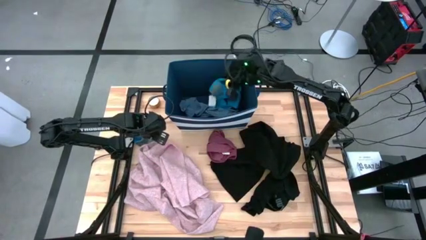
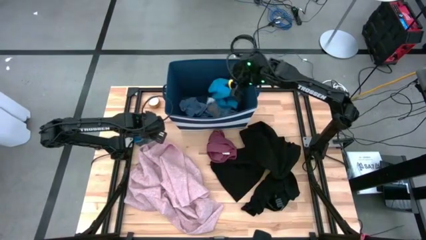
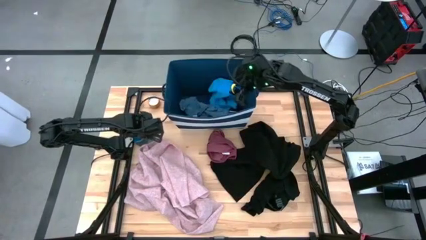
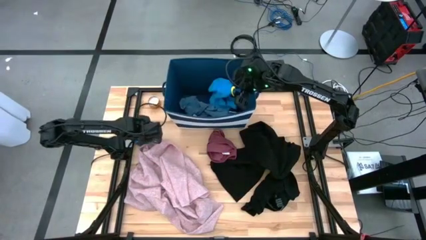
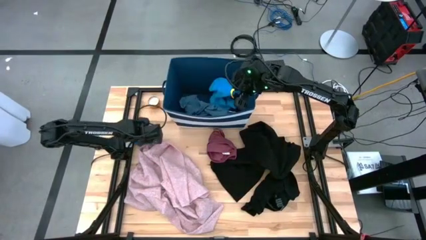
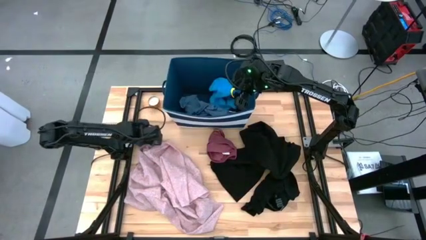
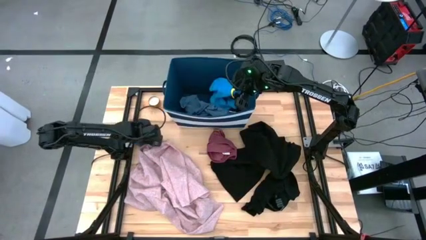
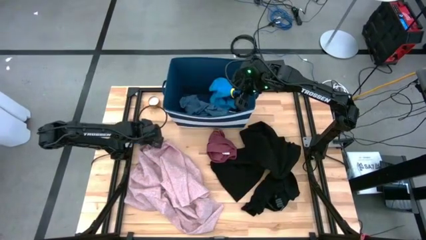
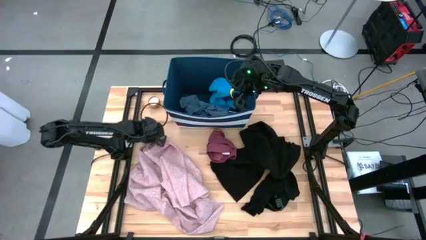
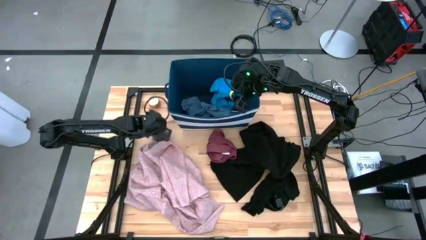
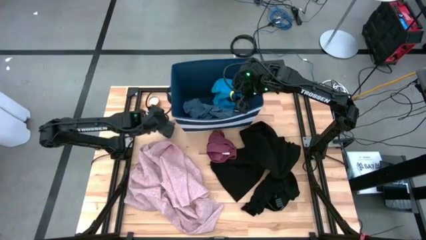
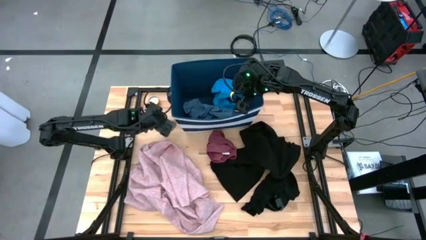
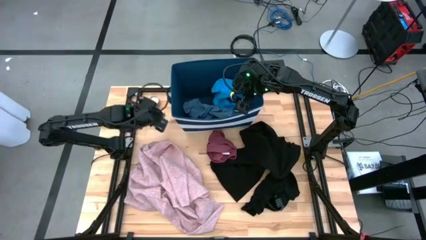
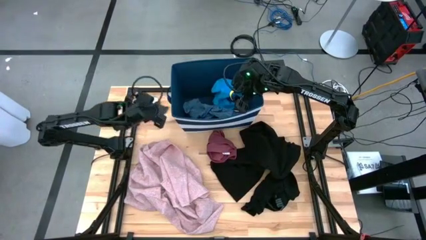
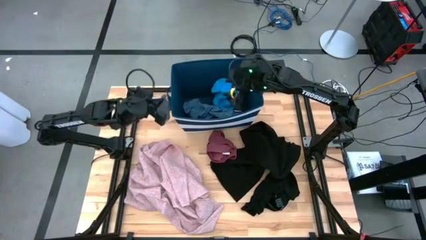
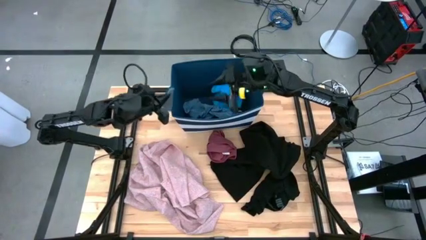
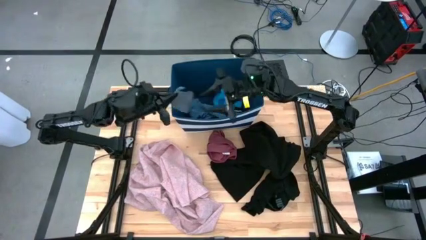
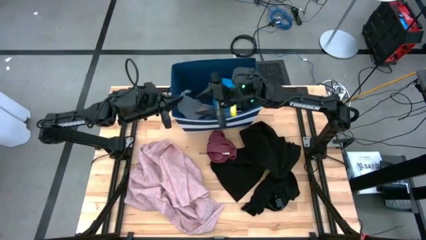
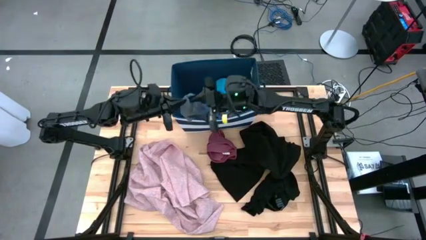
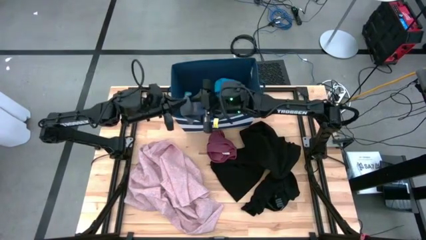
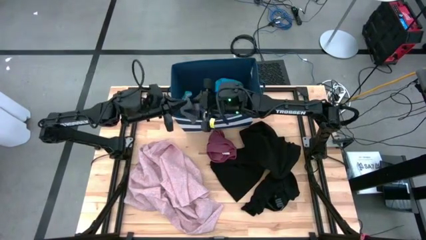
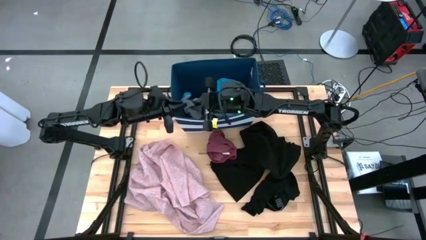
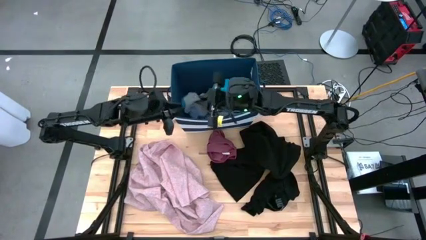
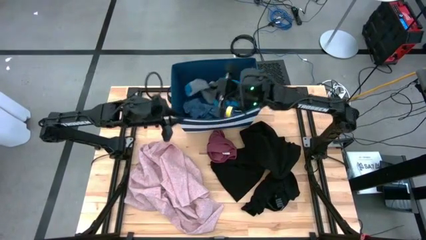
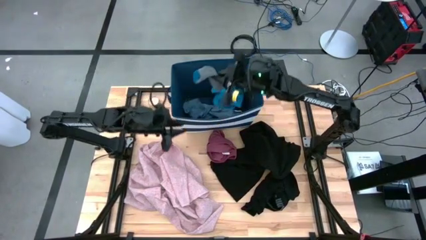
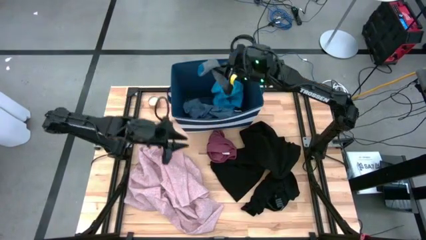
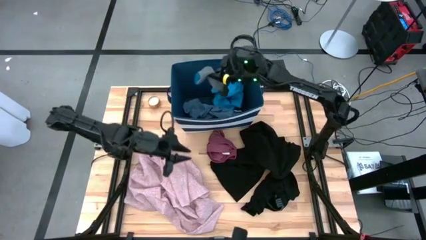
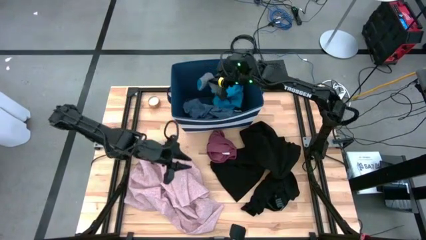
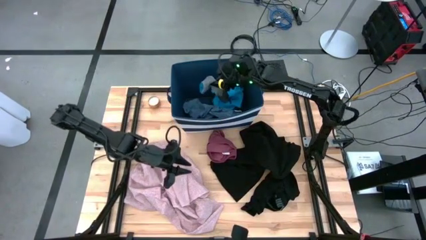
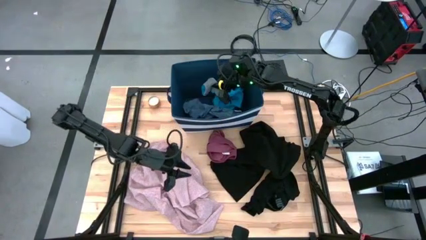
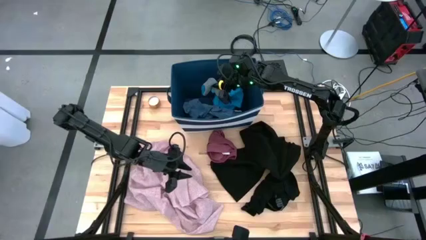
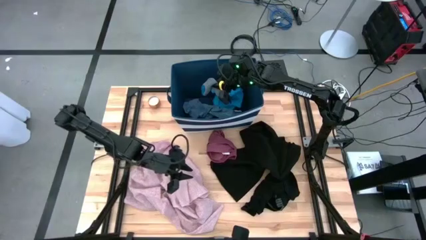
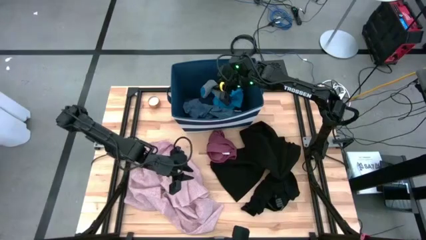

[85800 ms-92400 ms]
Task: Sort clothes
Put the gray sock into the blue laundry bin

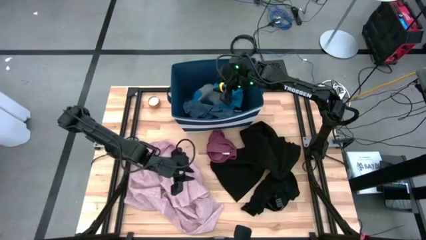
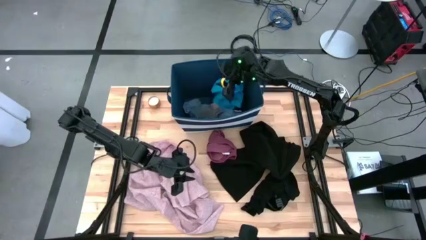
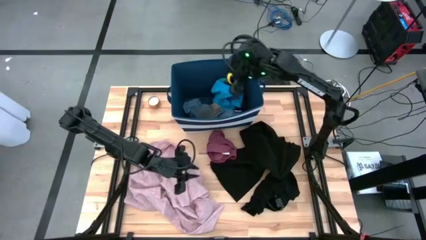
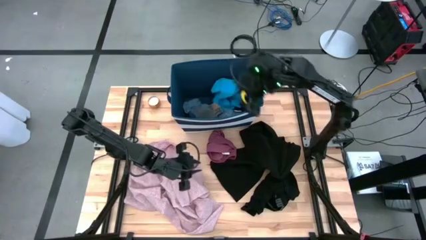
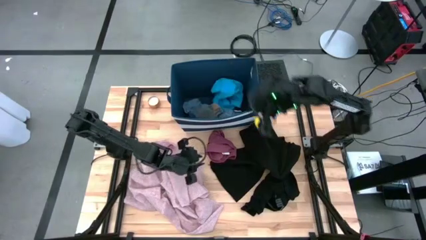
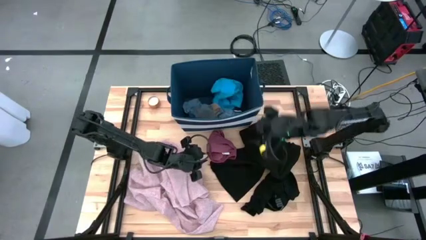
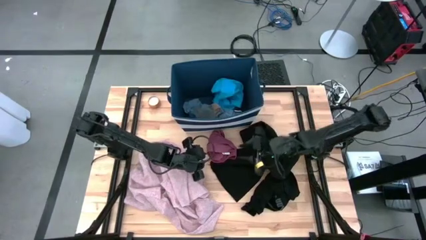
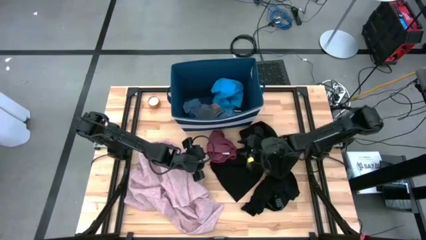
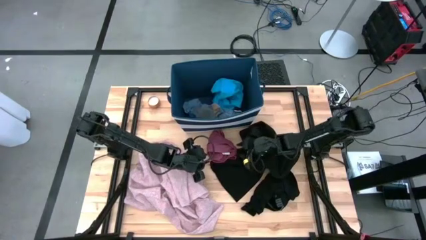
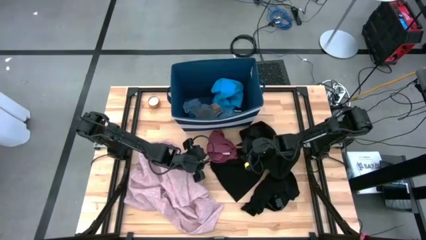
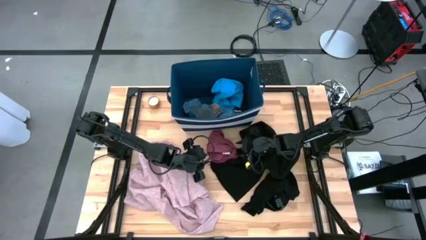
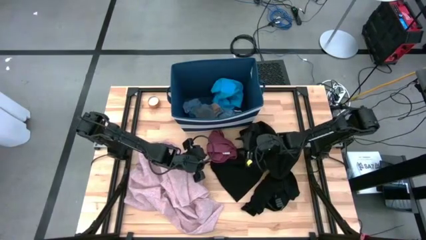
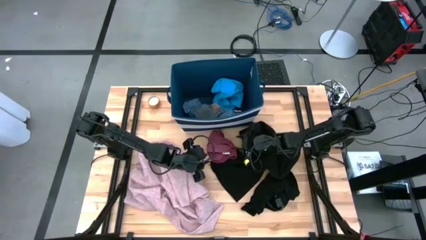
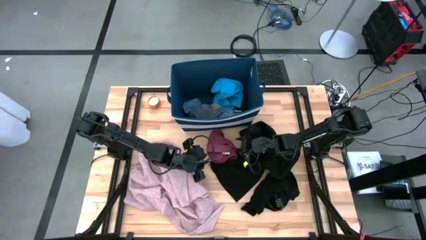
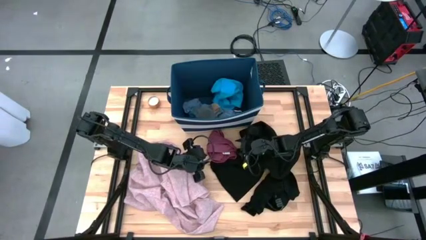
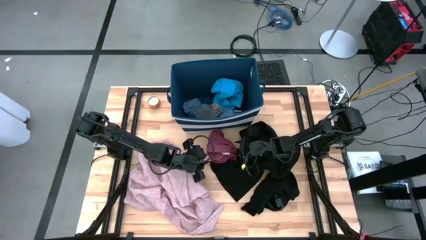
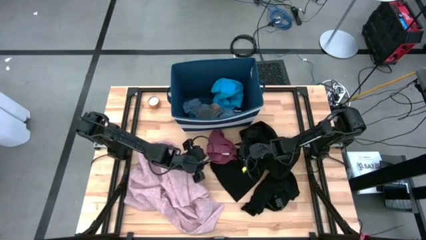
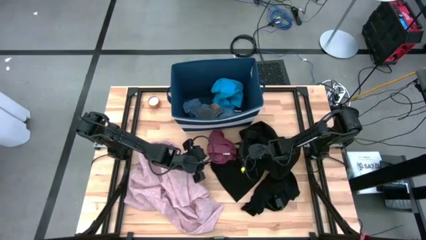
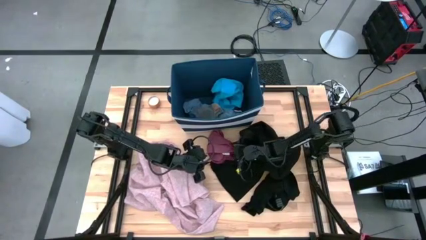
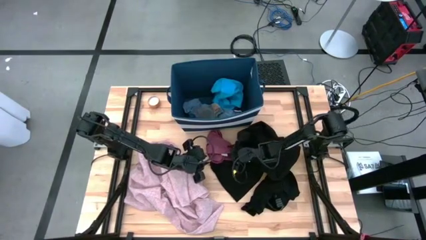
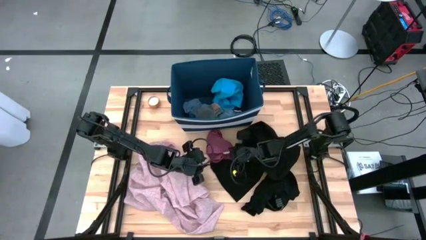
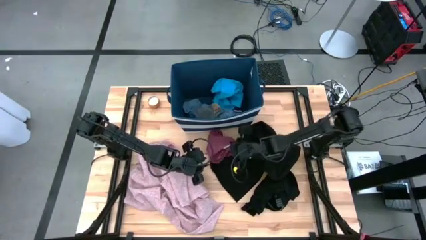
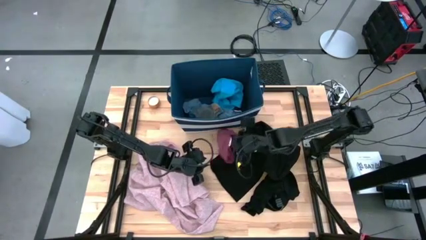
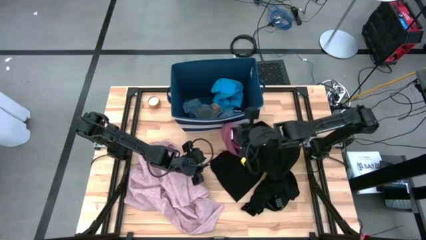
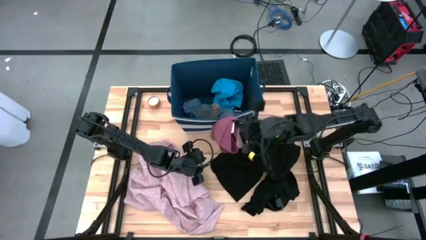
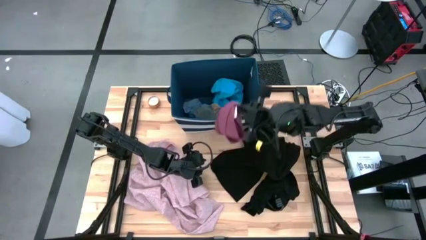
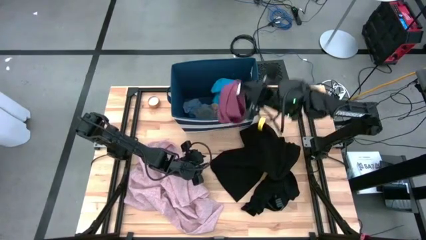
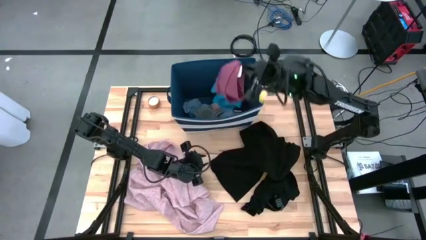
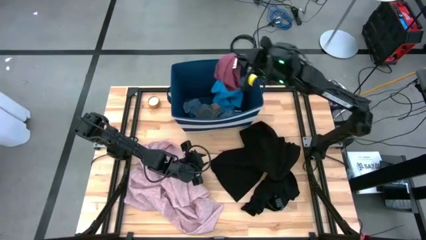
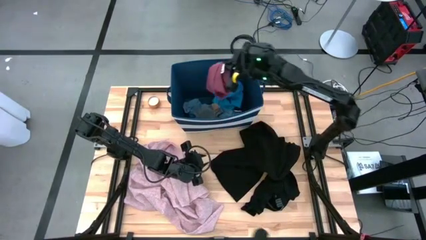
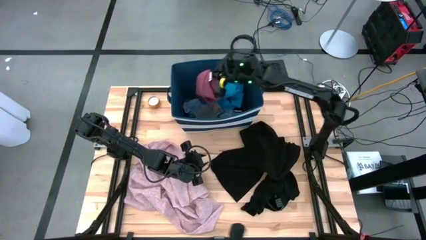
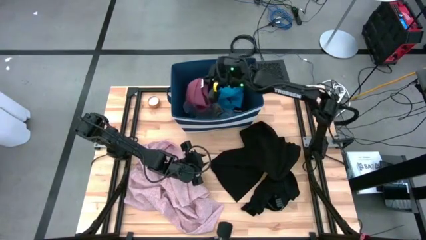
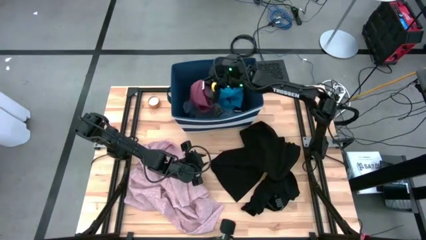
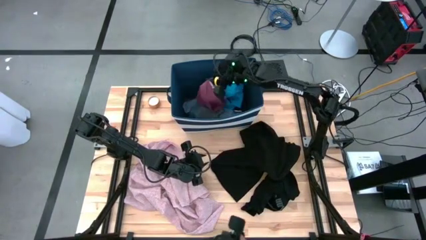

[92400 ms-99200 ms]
Put the maroon boxer shorts into the blue laundry bin

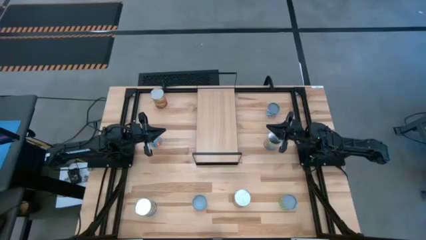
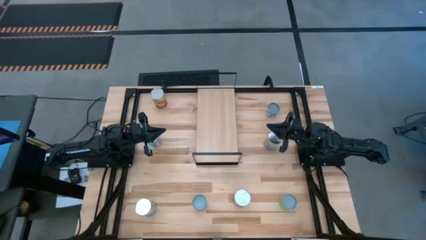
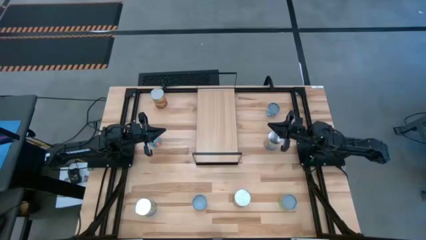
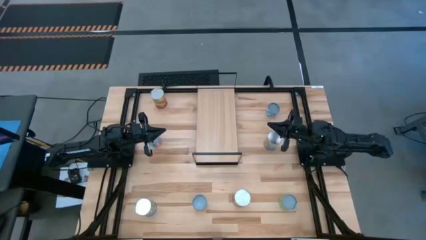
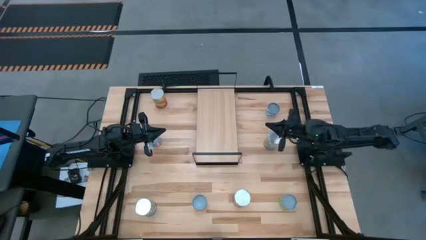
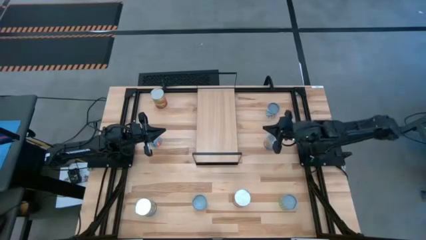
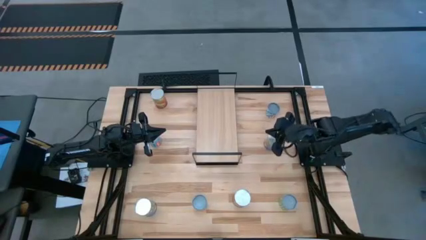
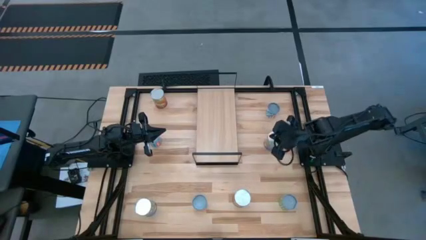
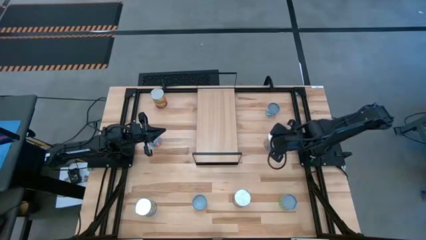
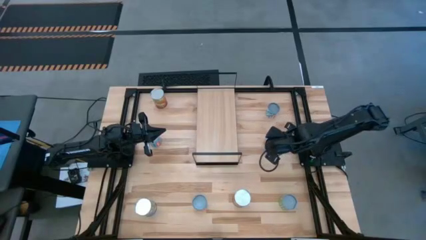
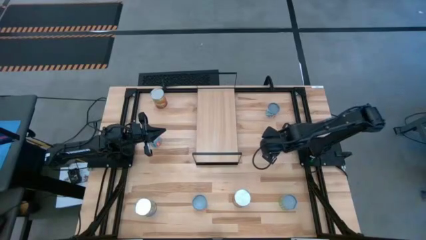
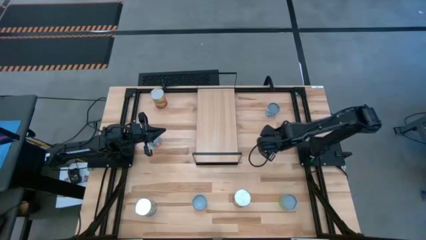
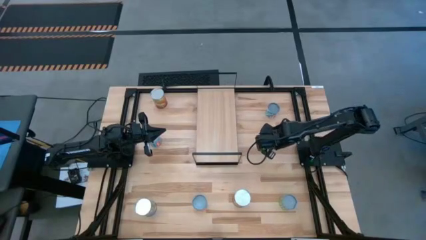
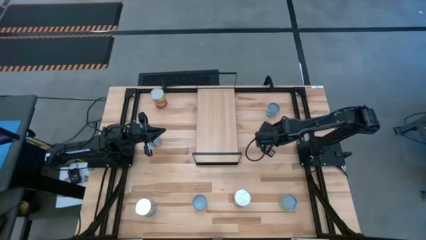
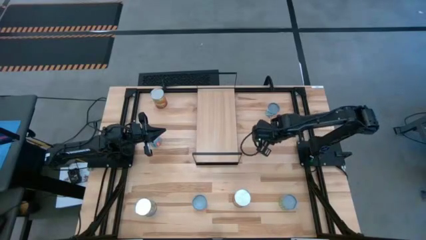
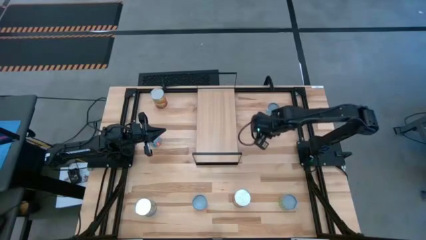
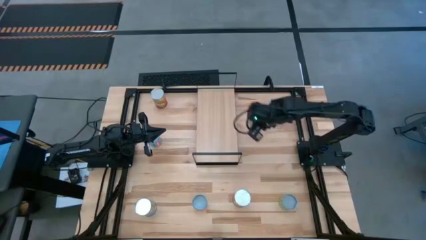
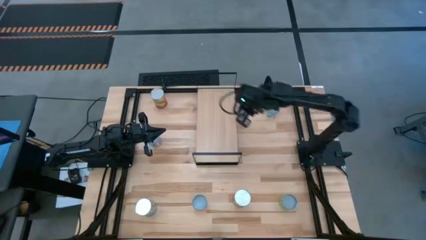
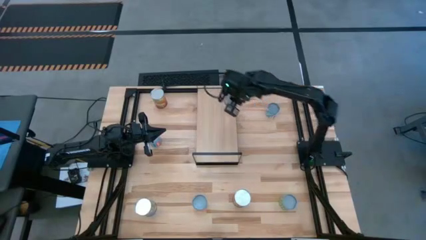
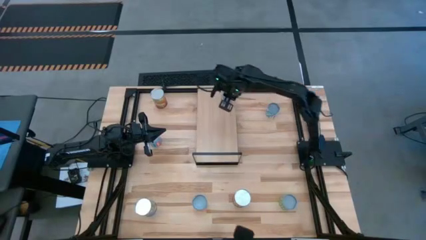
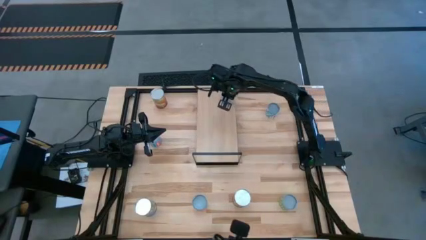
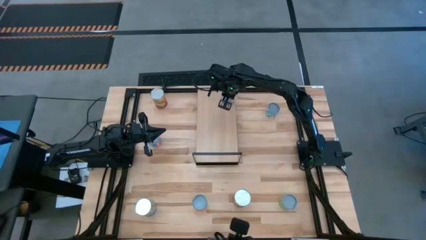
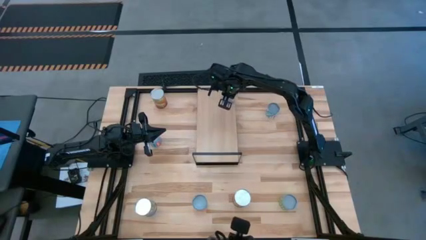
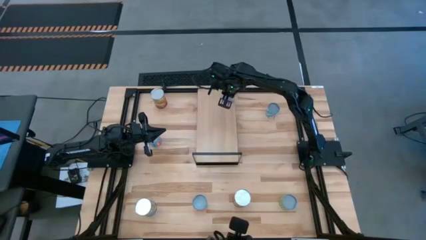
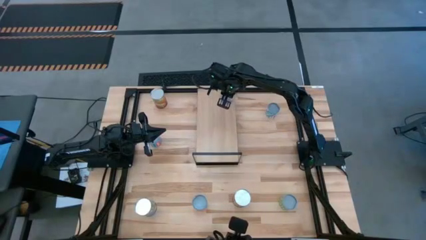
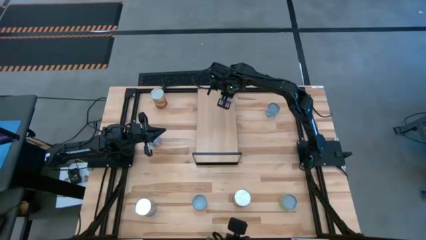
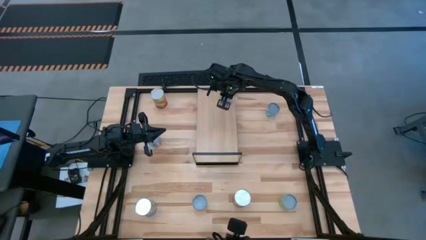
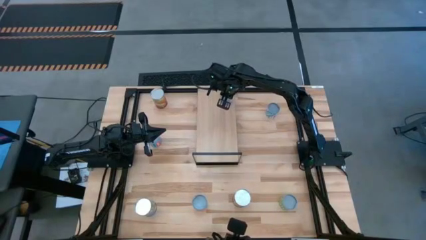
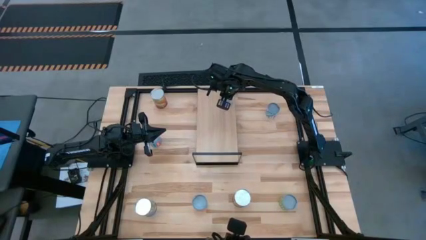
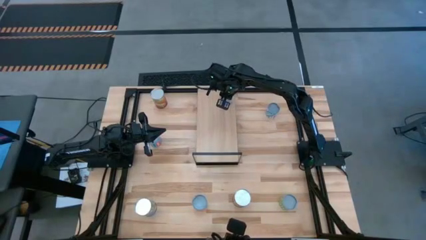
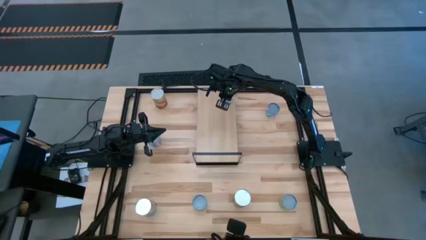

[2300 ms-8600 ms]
Task: Pick and place cans onto a shelf
Put the top large canned peaches on the shelf
